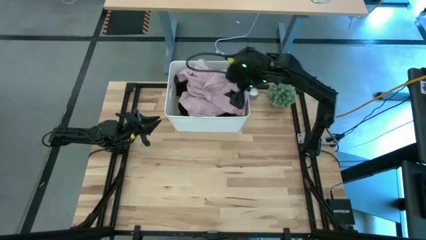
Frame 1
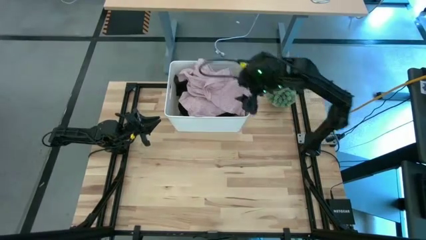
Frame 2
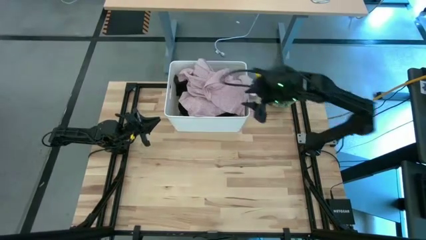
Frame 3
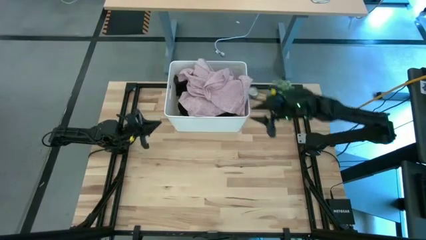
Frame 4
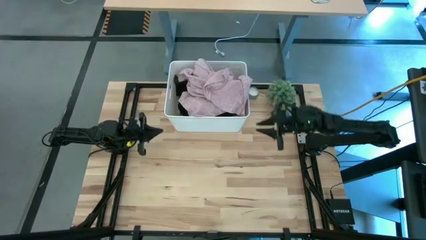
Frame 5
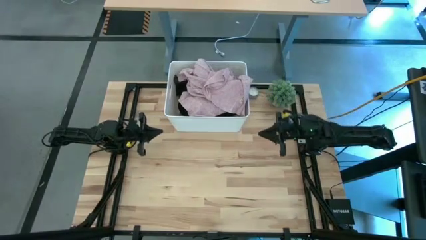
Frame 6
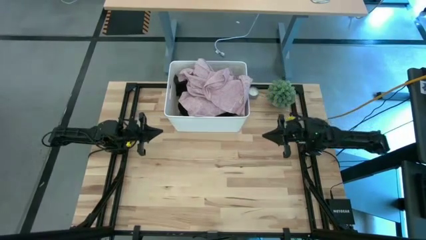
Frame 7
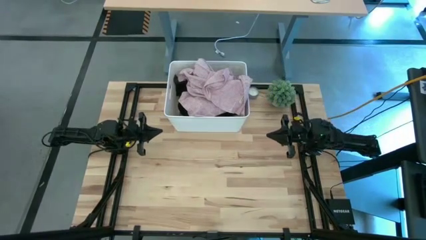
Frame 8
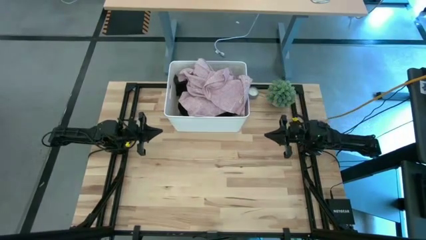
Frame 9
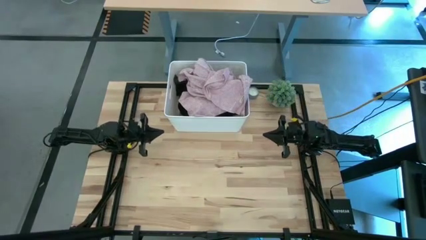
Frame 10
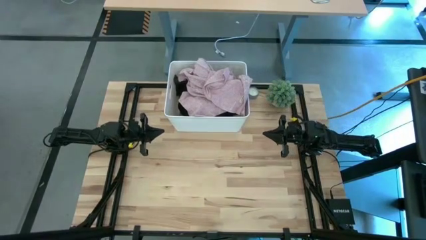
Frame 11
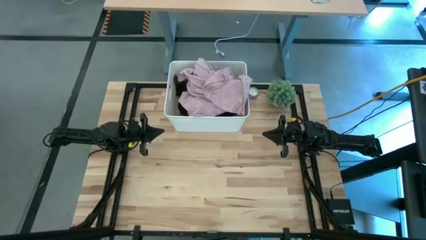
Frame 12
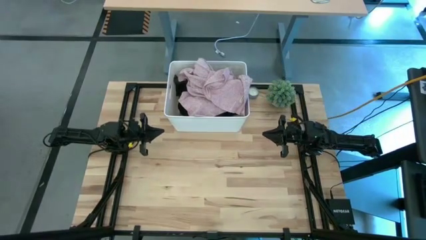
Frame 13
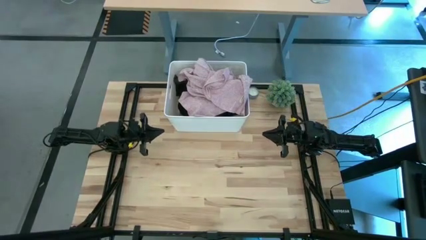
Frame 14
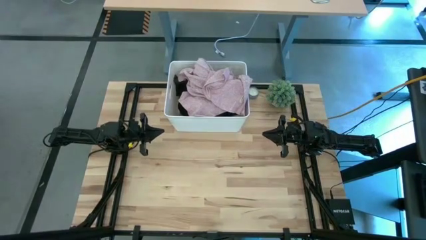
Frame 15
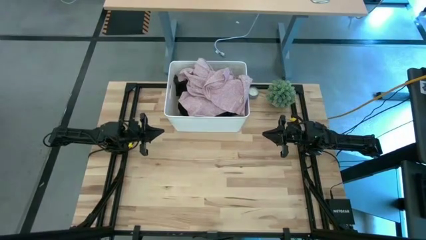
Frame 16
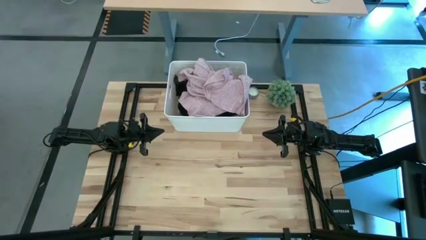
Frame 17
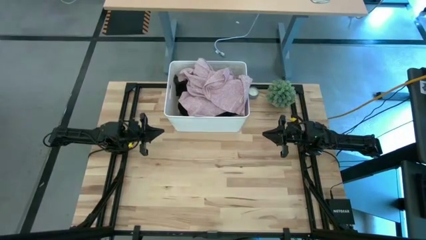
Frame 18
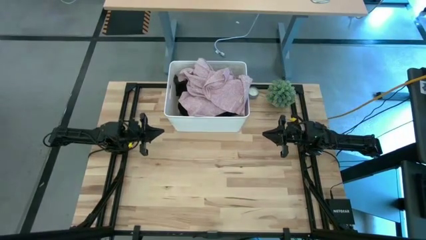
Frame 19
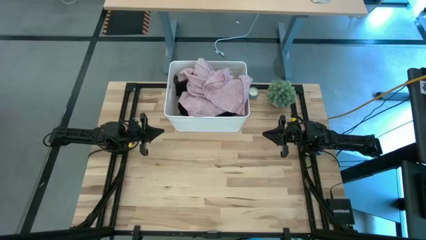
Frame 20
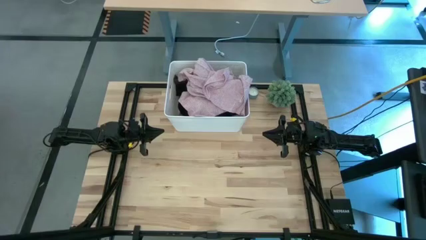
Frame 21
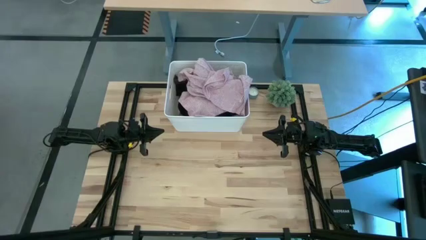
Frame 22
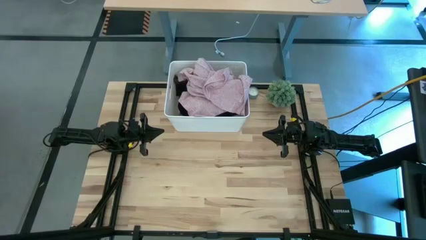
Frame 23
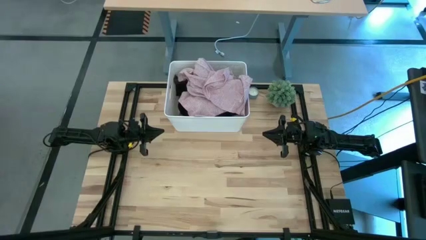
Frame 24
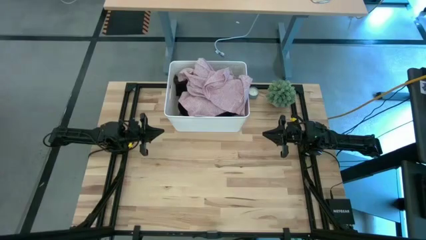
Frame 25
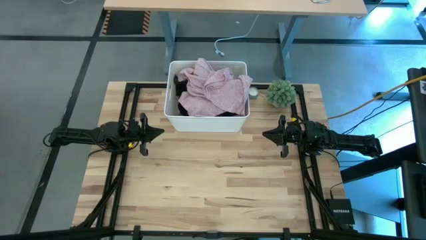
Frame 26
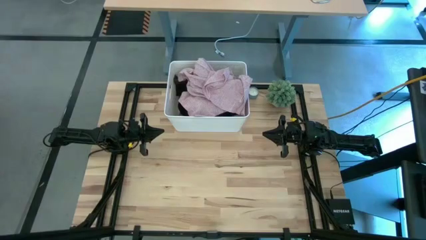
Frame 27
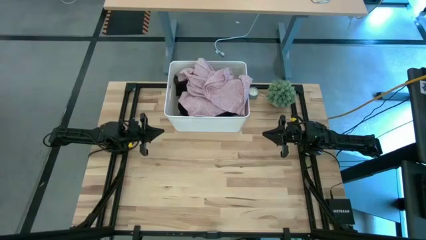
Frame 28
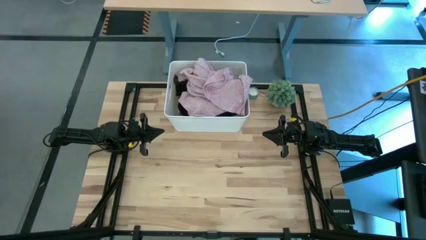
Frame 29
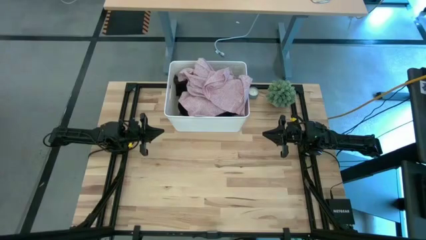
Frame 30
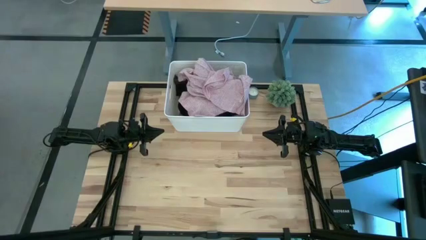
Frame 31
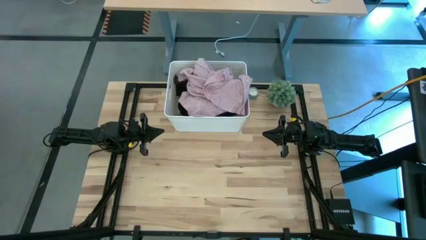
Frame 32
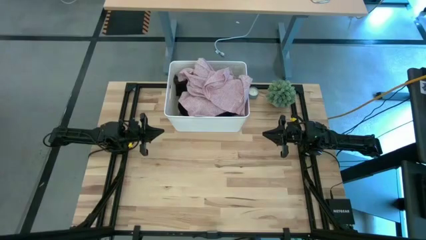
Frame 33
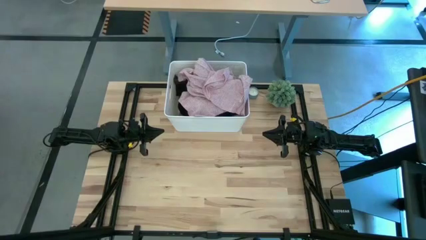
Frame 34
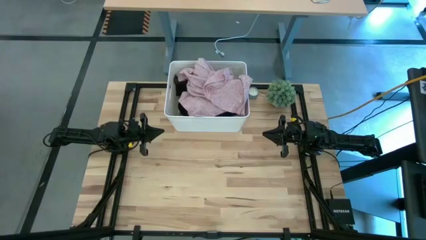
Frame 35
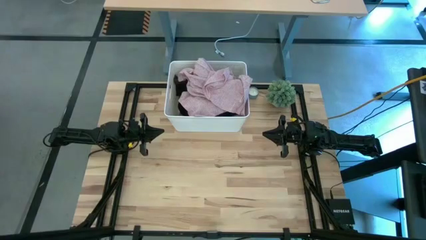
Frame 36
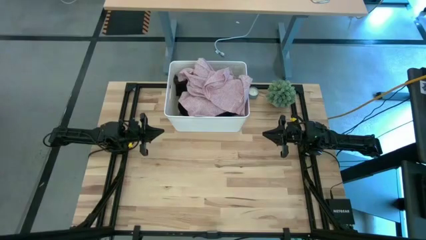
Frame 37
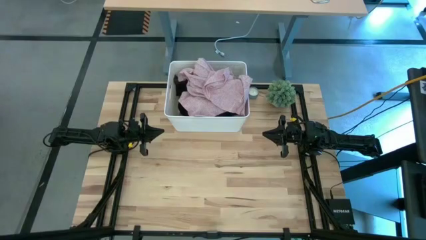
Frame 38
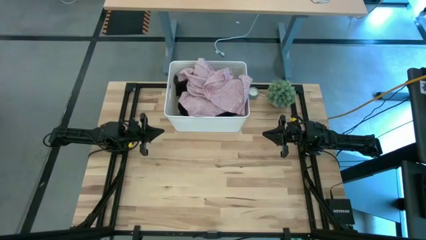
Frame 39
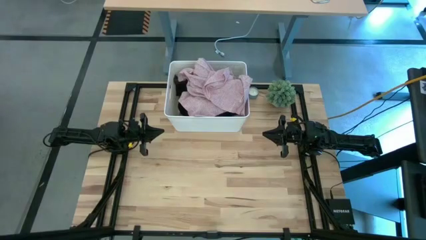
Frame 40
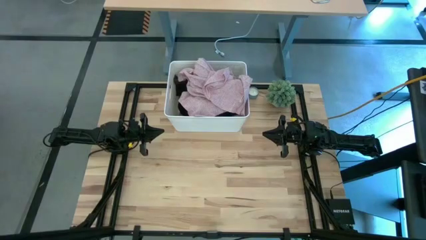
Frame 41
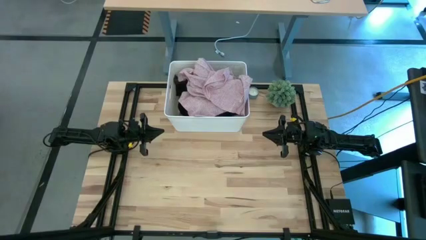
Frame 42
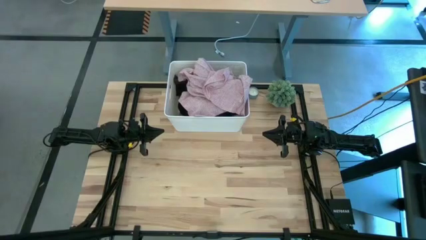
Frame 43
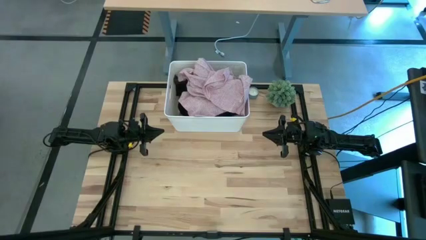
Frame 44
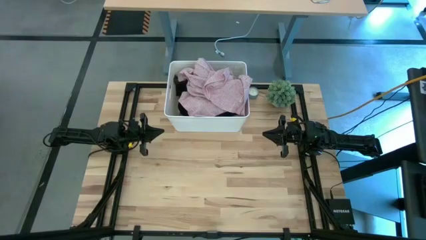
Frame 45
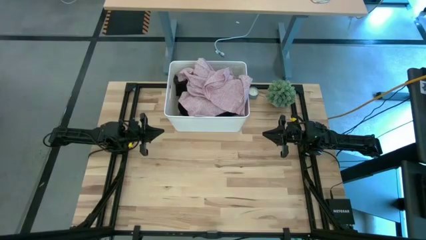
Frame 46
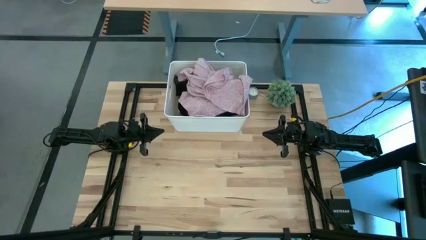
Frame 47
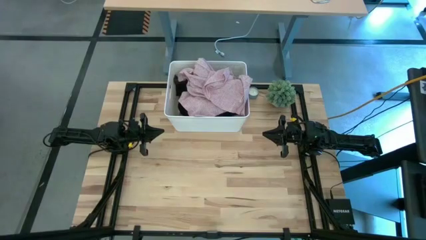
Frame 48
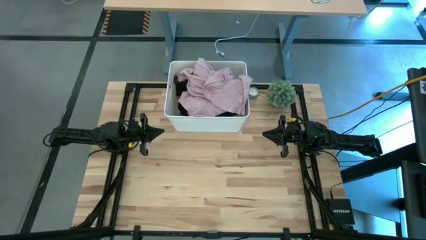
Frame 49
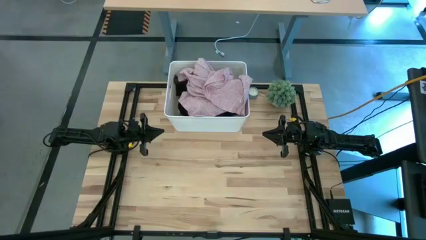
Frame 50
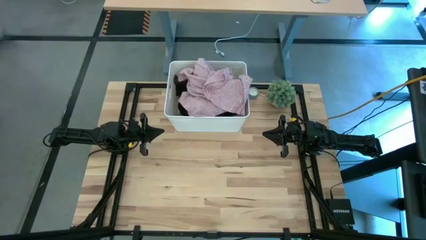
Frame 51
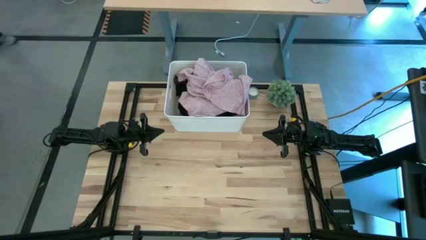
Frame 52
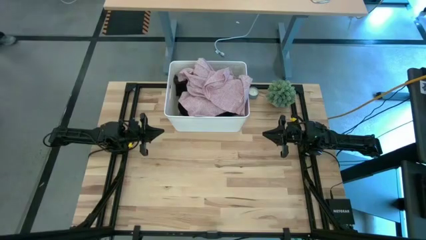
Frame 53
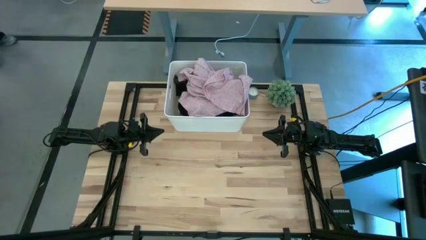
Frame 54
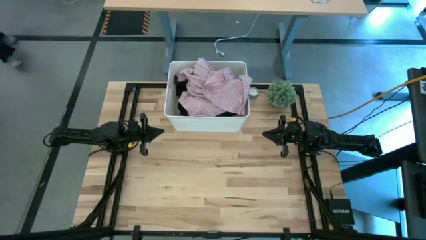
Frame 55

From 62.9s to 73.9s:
Task: Sort clothes
Return to Home Position

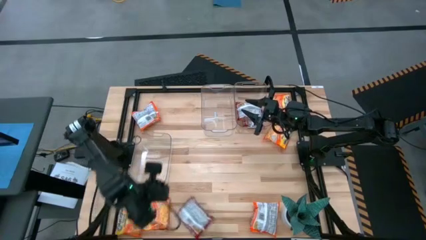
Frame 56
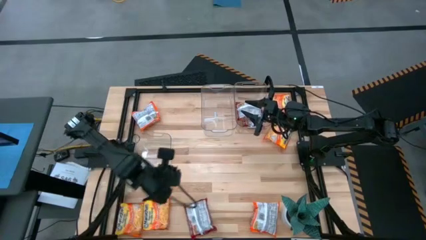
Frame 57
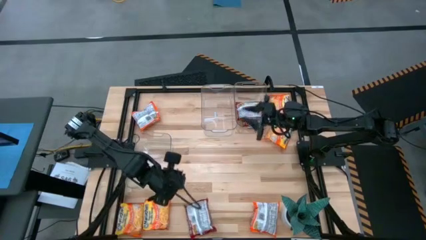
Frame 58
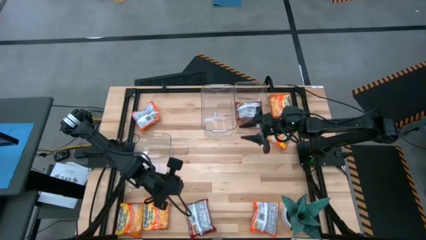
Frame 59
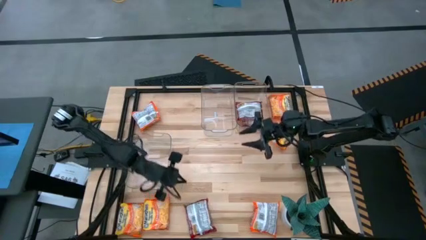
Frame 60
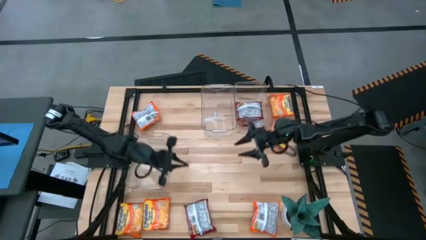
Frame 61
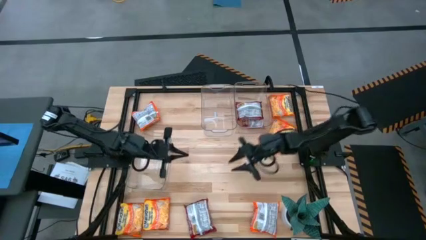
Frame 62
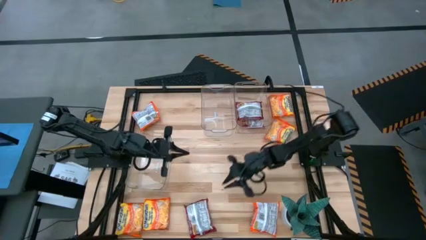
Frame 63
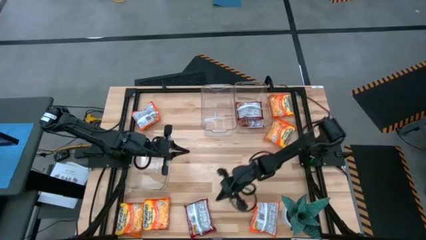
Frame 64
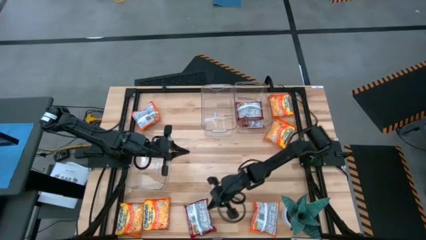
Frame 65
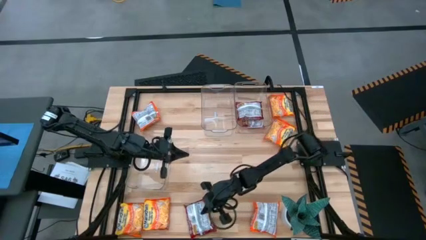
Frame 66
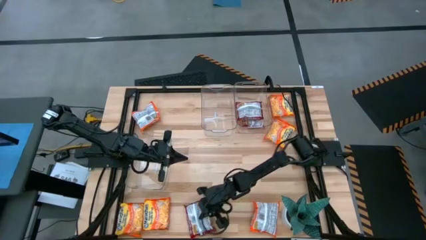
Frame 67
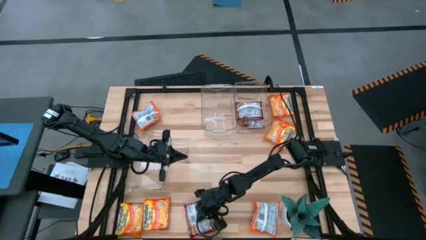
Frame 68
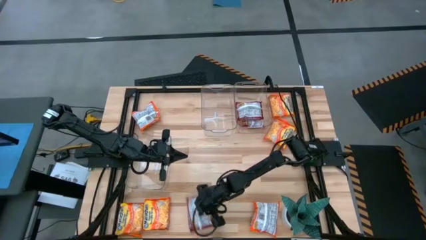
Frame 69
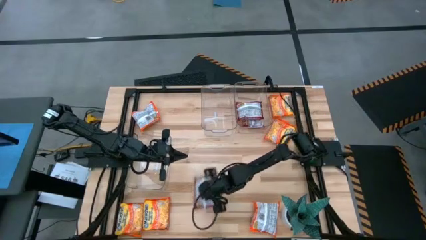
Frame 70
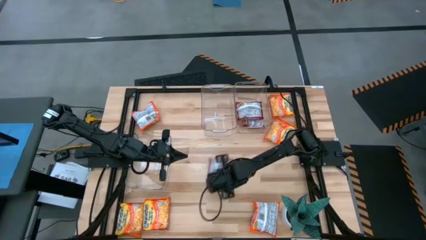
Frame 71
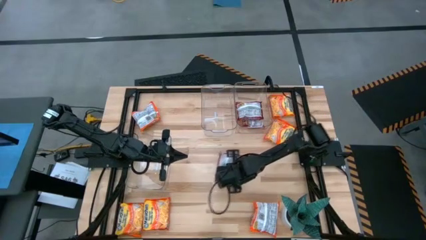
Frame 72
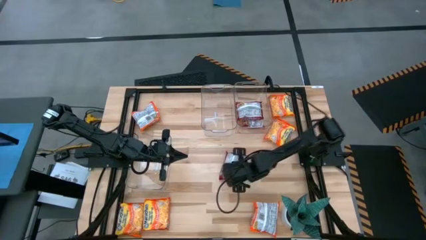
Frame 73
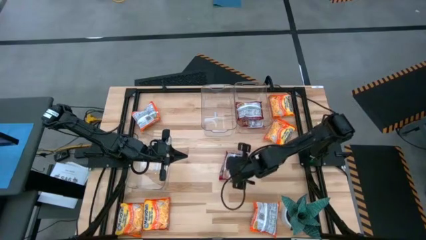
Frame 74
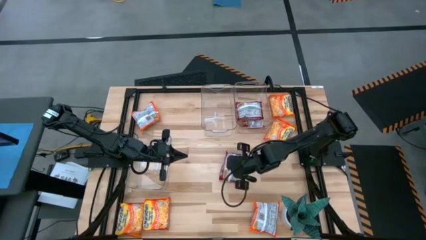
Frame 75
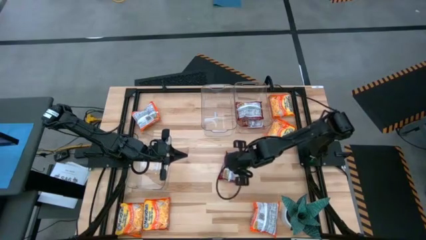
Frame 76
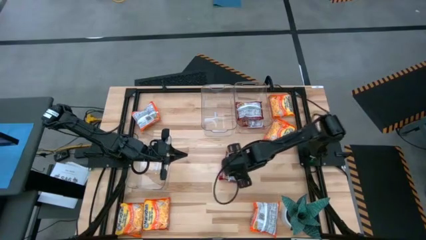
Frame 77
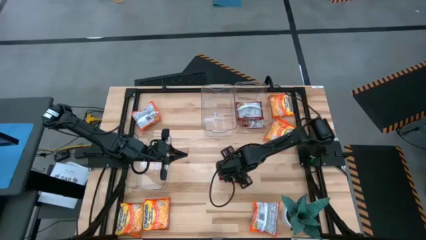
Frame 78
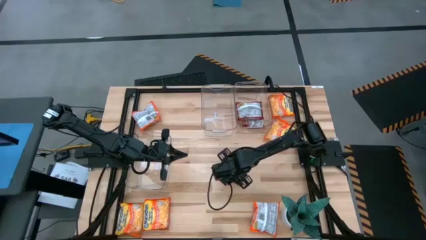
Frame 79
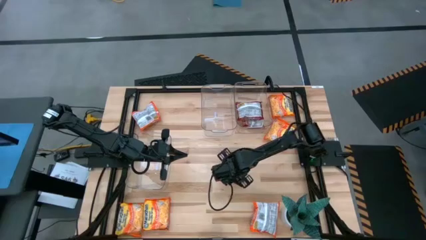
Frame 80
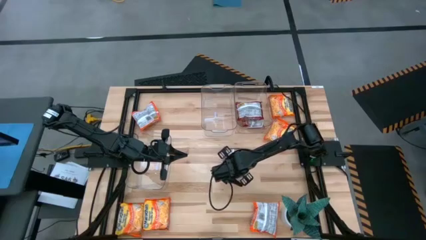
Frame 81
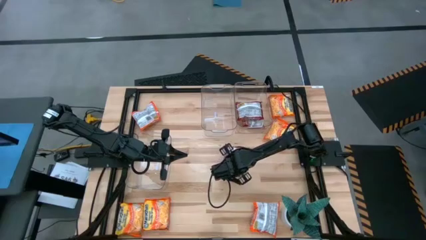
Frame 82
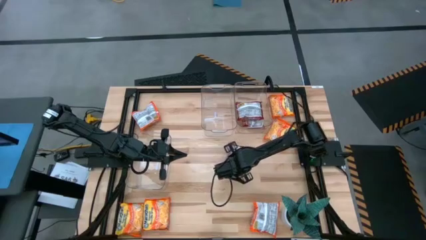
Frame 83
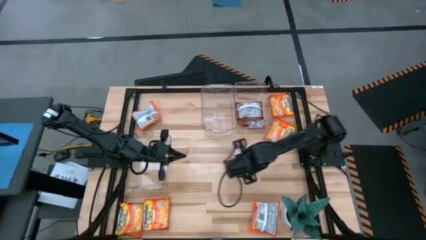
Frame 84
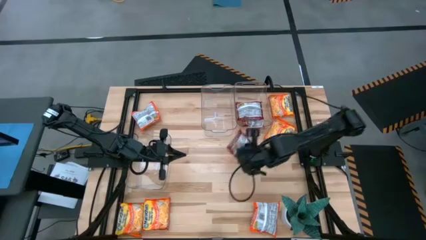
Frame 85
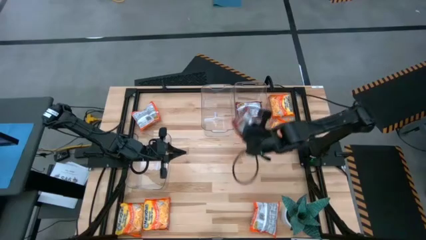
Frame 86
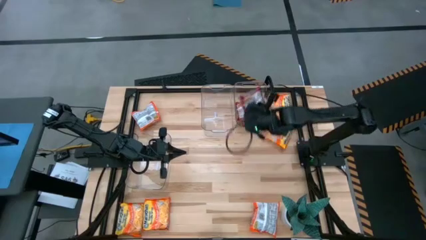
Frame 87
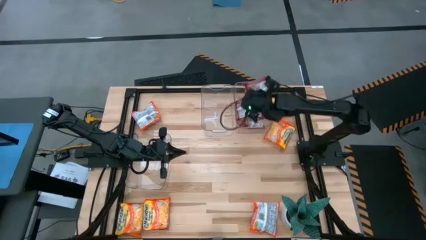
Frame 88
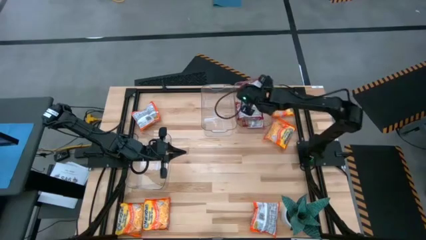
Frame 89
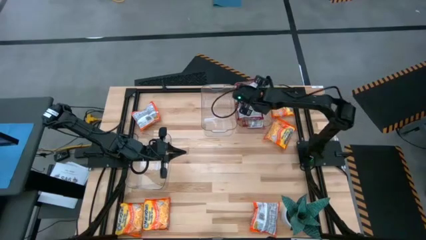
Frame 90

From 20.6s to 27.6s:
Task: Sort Maruchan noodles
Put the red noodle pack into the top right transparent bin
